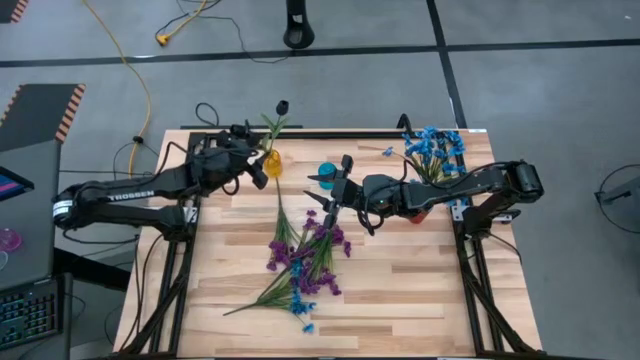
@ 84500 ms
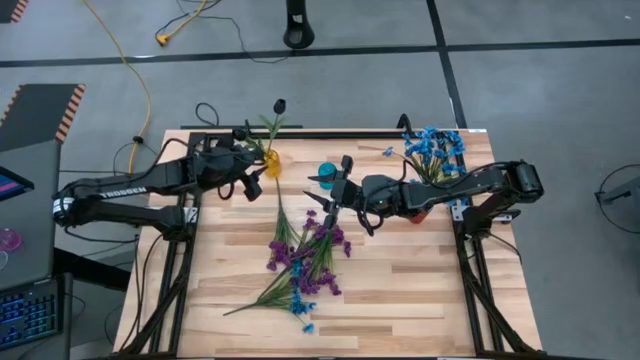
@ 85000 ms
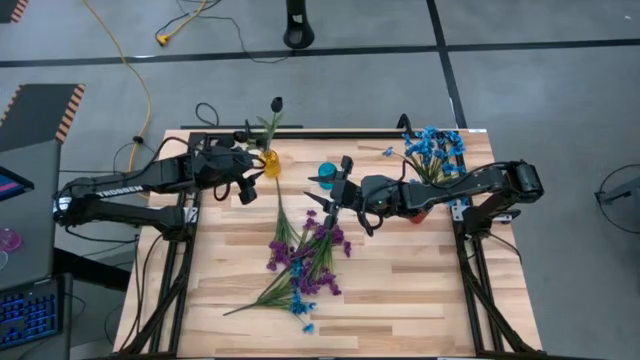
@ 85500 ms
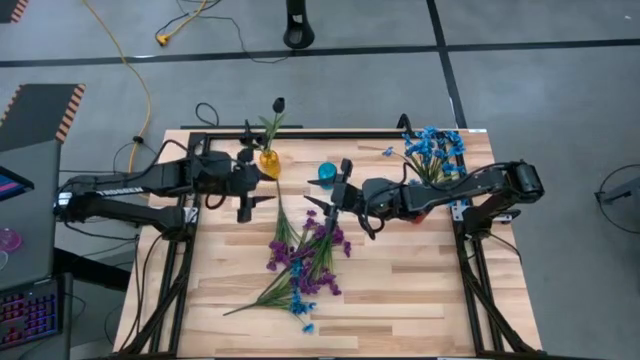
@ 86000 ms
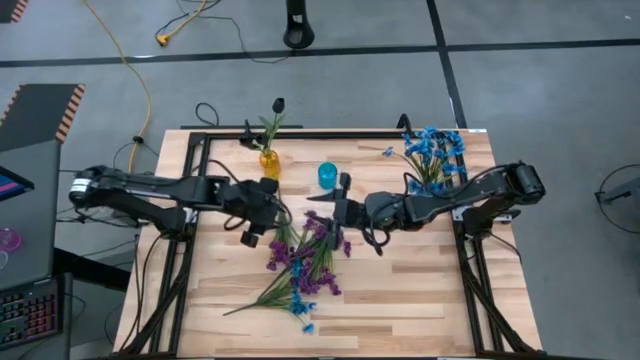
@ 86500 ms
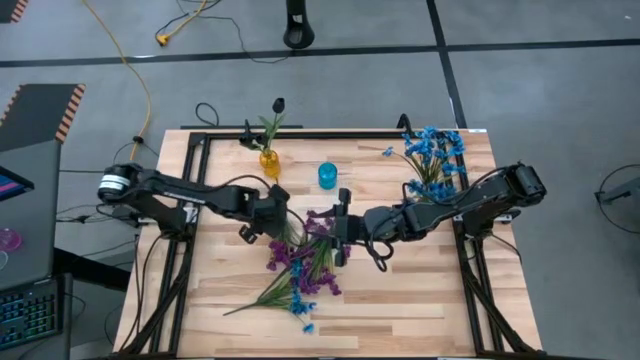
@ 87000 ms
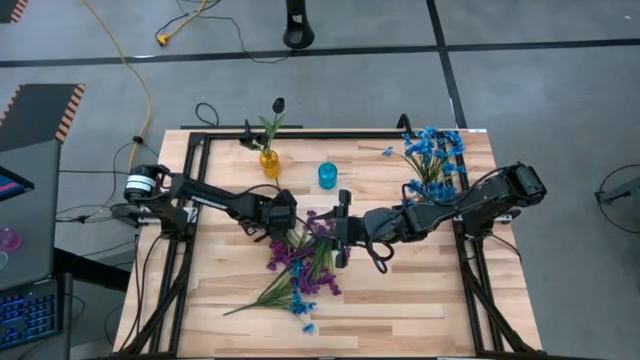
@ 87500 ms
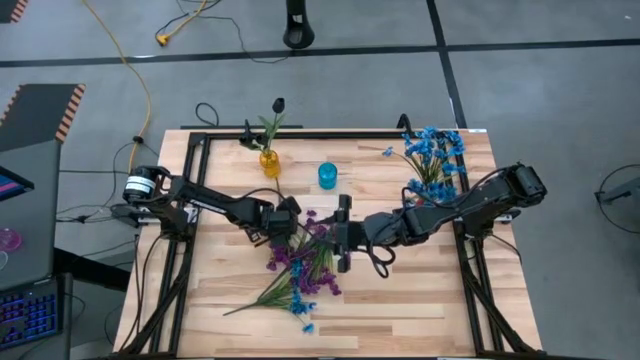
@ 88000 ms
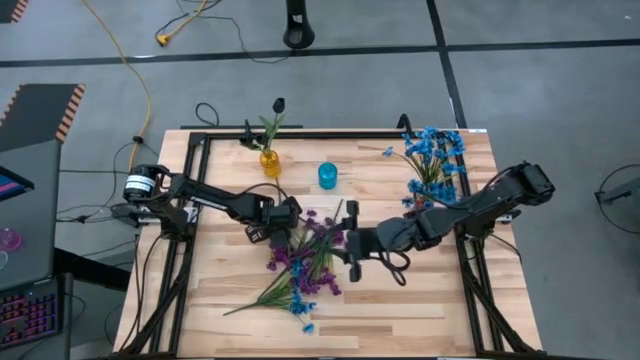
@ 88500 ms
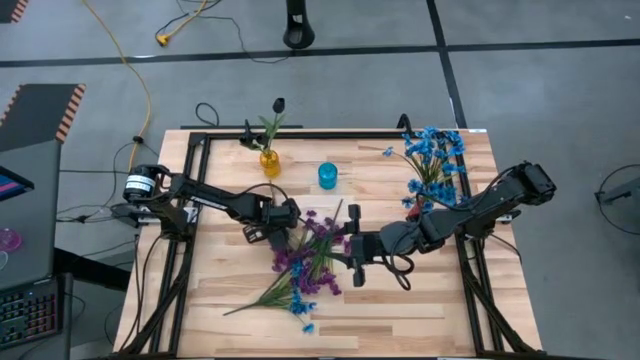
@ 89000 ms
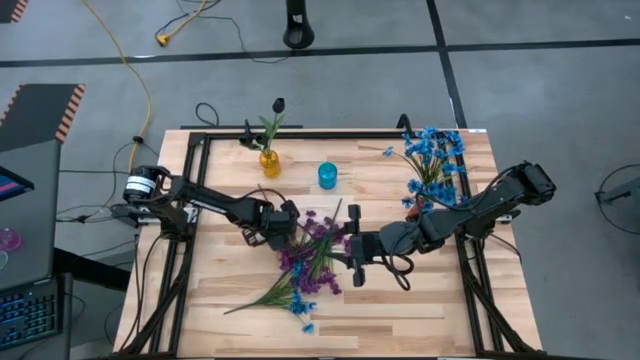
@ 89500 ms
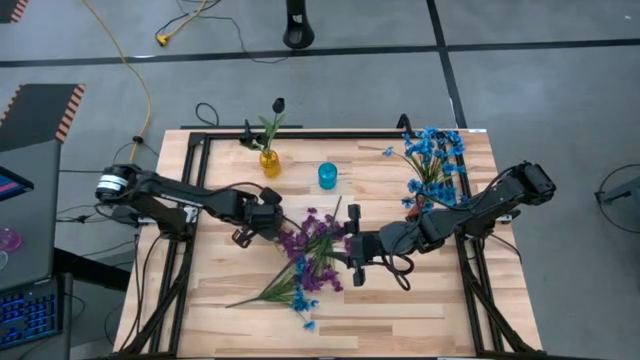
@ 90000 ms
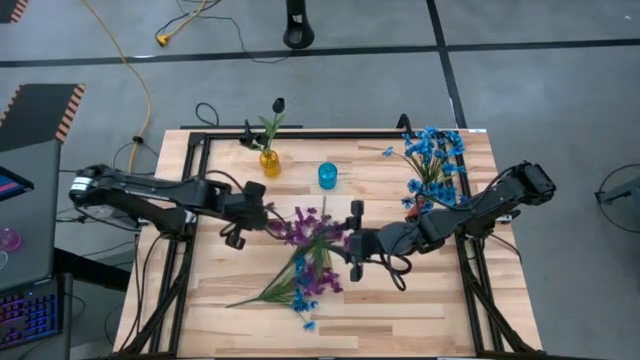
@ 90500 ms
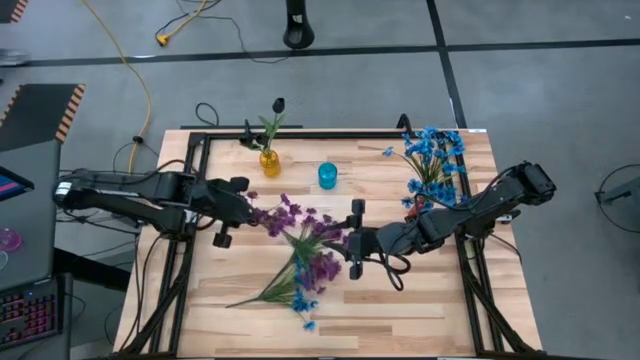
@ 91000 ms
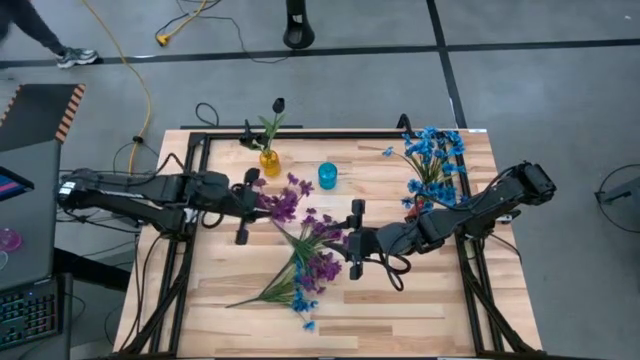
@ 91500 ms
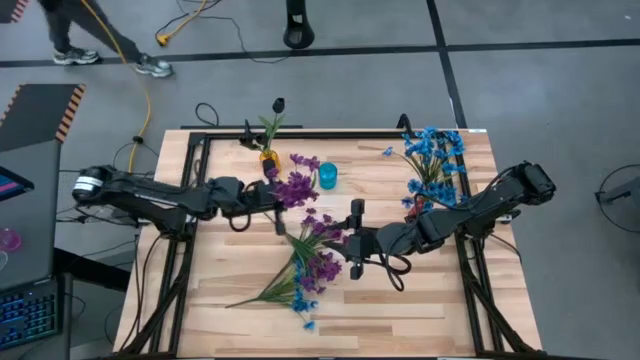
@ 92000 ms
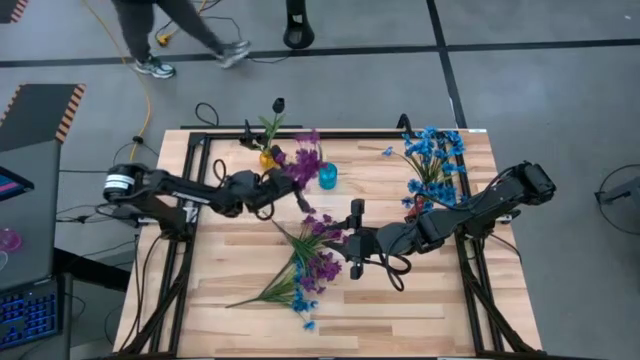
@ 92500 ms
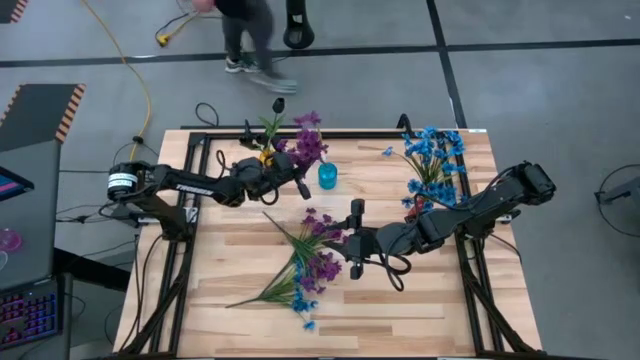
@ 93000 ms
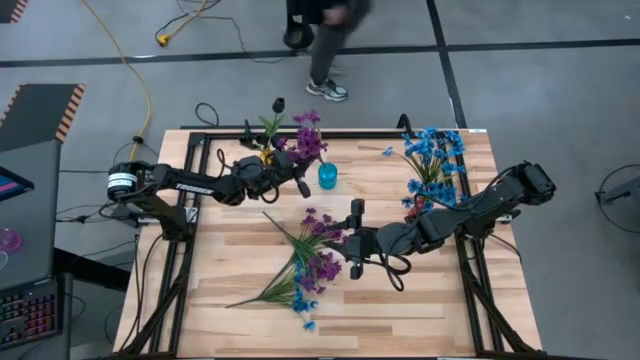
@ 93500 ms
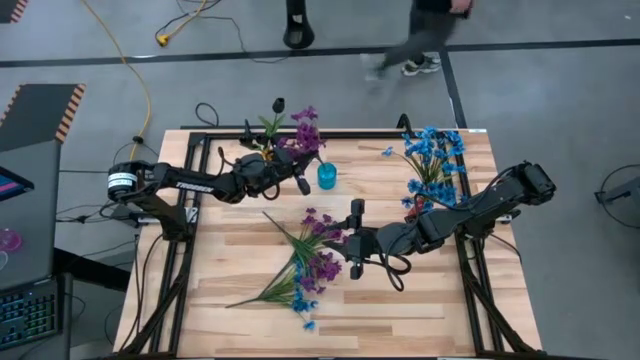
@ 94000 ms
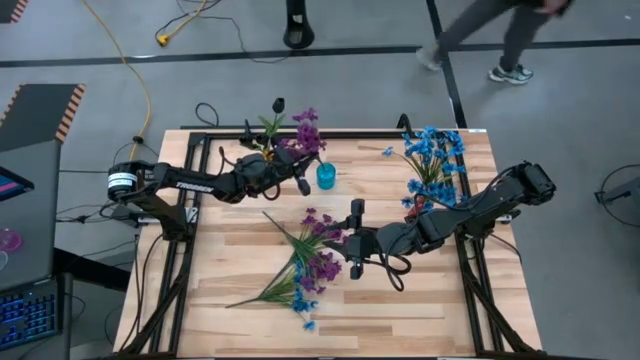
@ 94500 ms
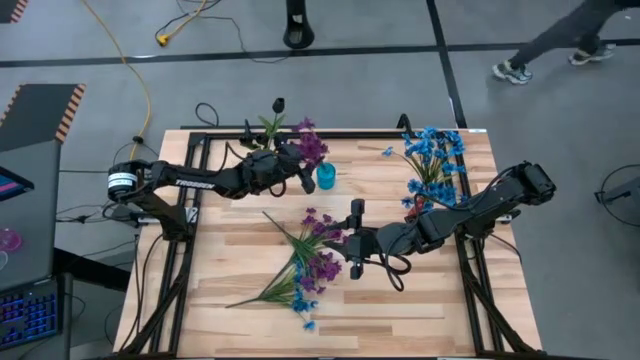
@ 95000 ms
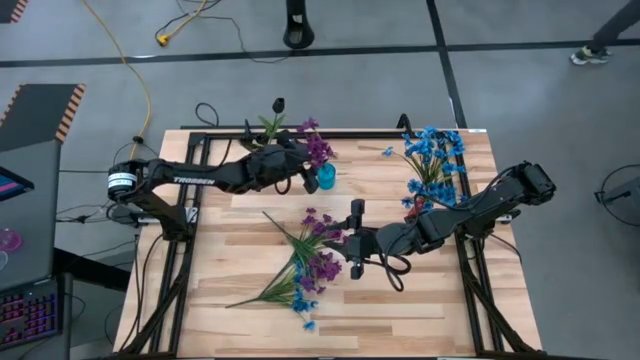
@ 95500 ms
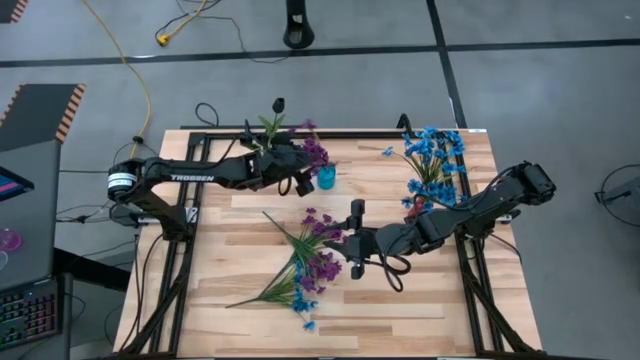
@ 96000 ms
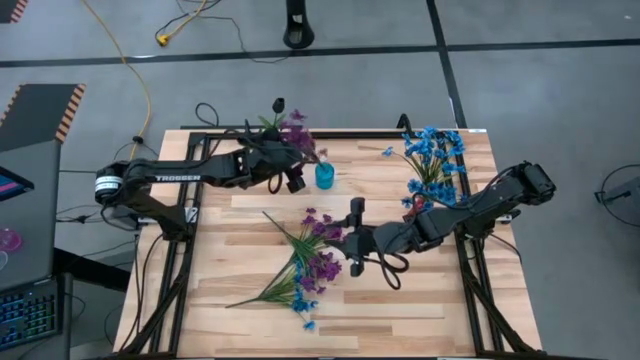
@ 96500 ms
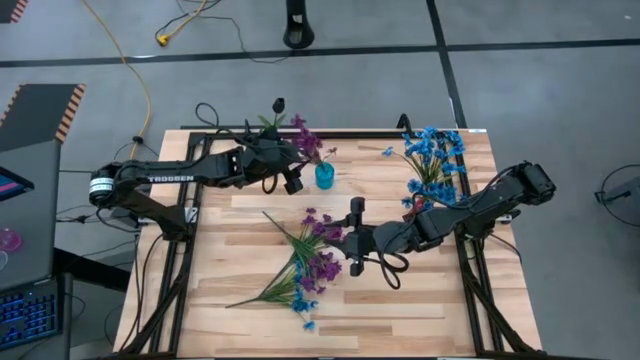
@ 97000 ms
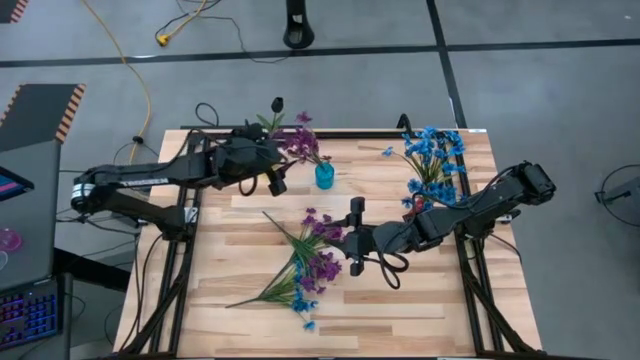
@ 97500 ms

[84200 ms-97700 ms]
Task: Sort flowers into vase by color
Put the left violet flower into the blue vase

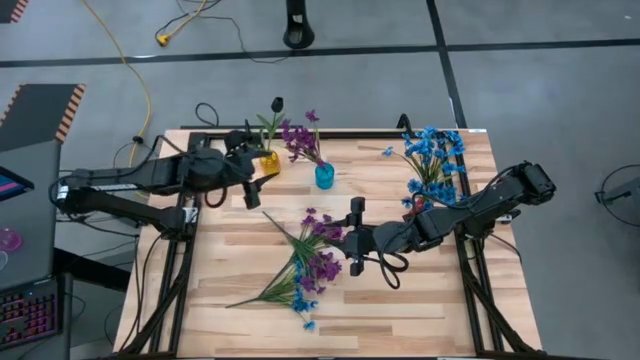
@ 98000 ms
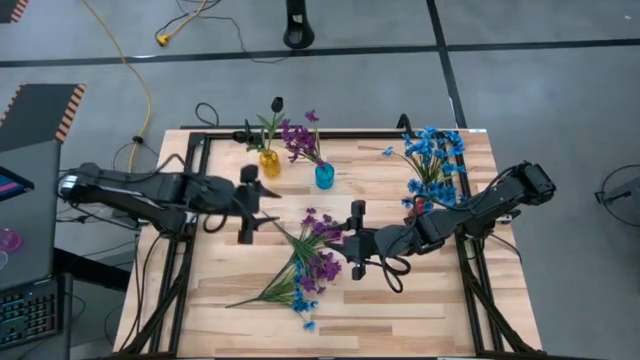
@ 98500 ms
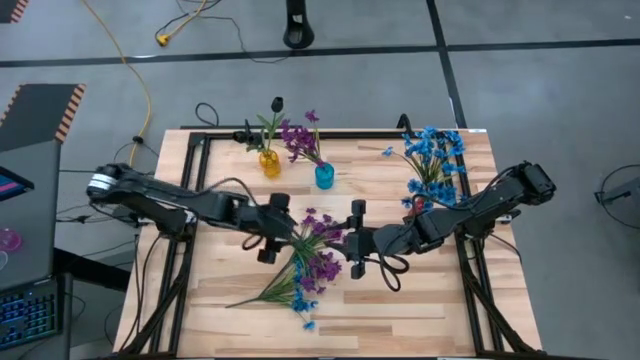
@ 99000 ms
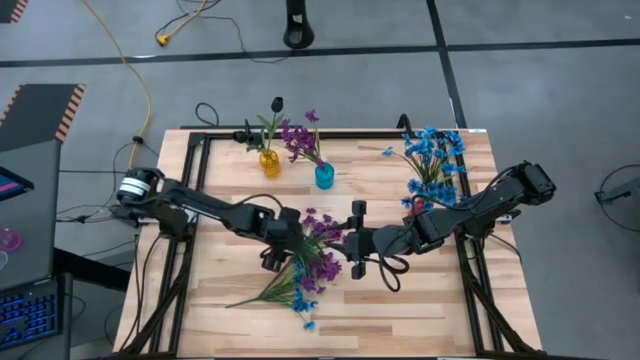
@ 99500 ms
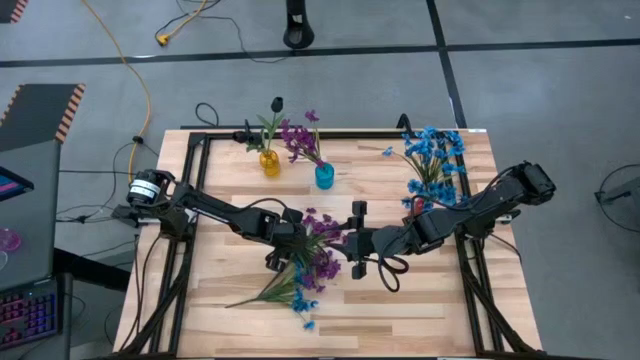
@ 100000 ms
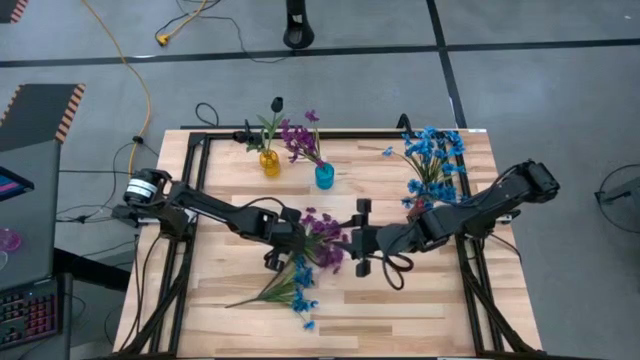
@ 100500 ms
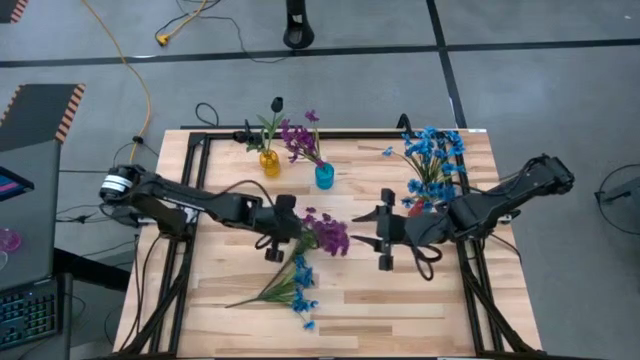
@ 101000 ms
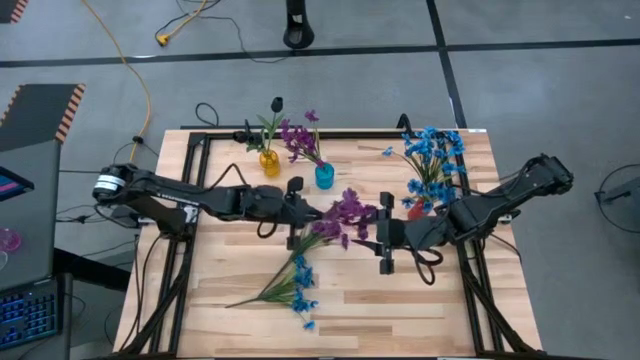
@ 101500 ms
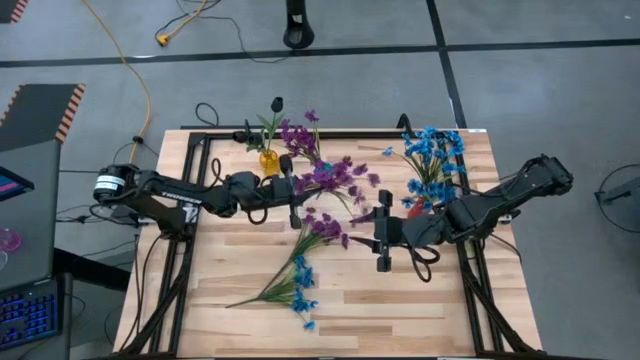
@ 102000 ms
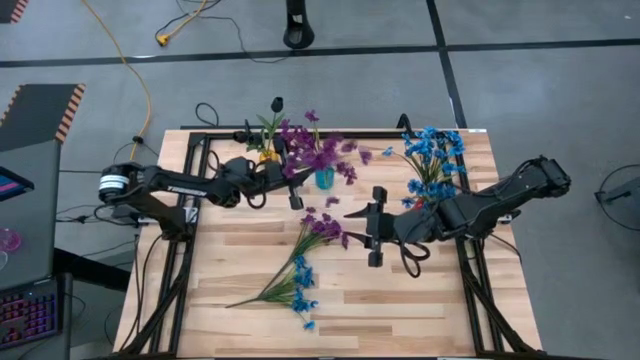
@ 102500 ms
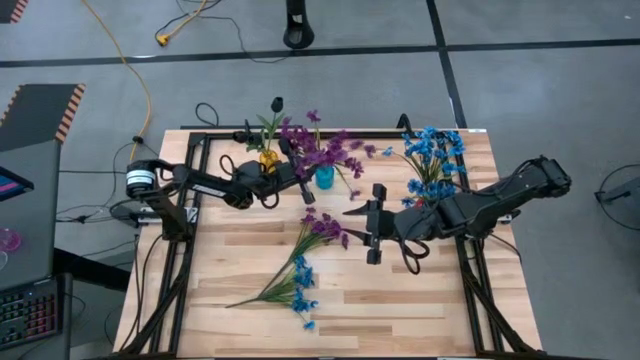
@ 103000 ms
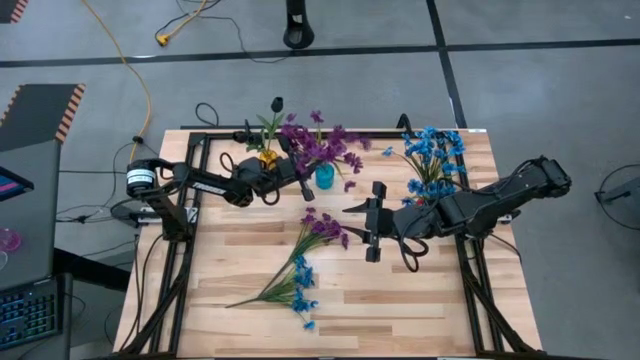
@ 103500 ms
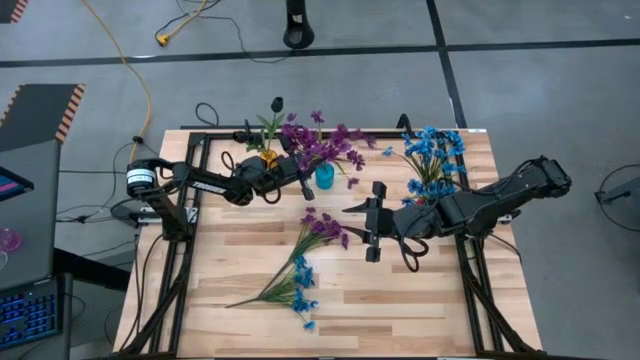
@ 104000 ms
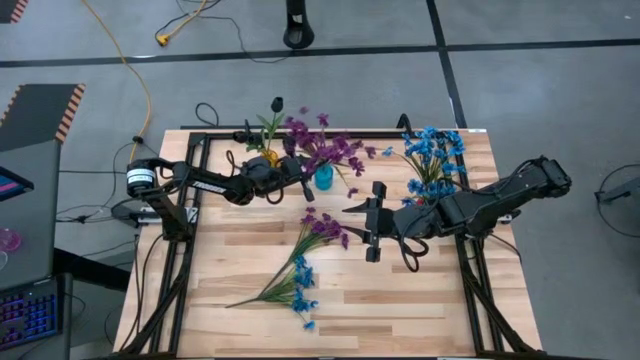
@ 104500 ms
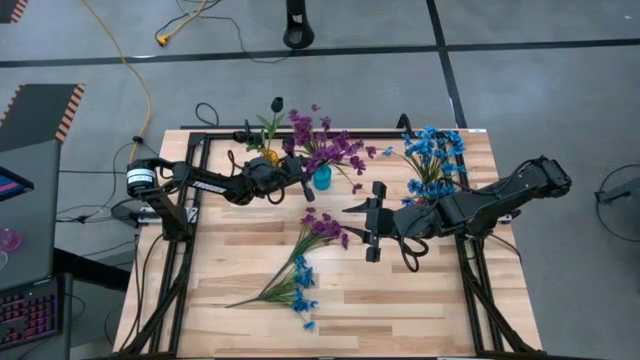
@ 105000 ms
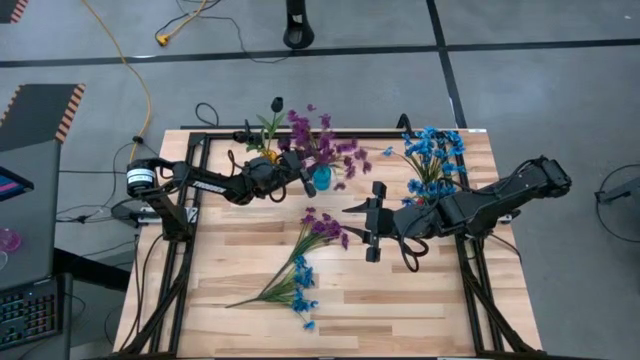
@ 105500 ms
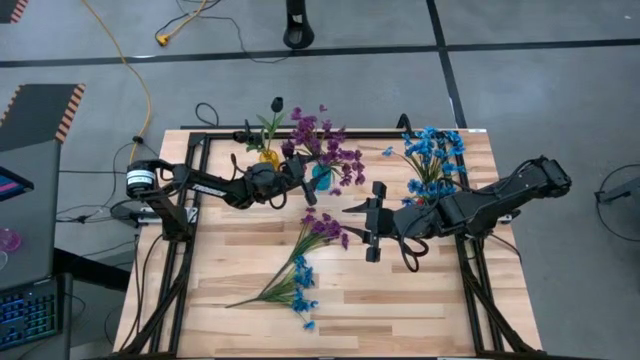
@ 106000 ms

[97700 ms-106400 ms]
Put the bottom violet flower into the blue vase
